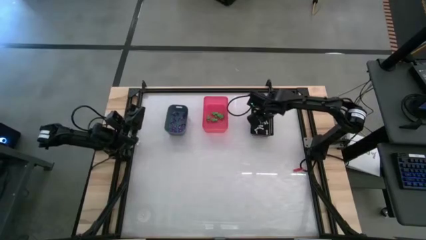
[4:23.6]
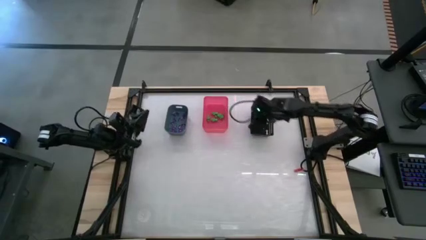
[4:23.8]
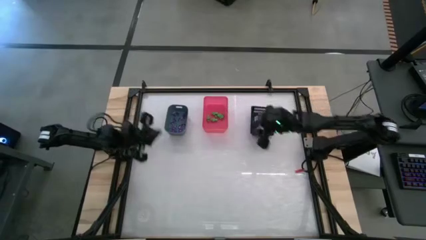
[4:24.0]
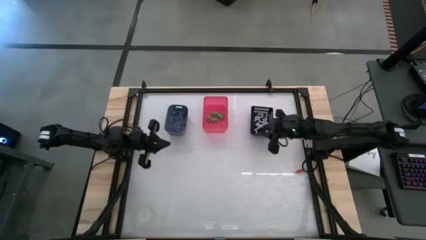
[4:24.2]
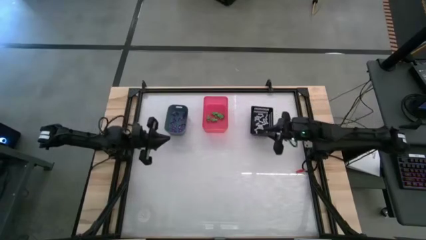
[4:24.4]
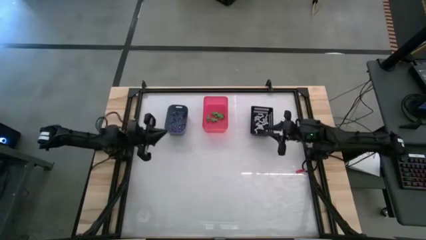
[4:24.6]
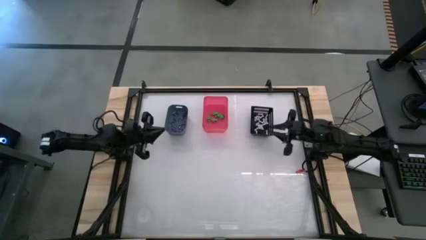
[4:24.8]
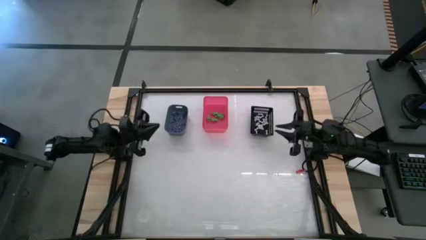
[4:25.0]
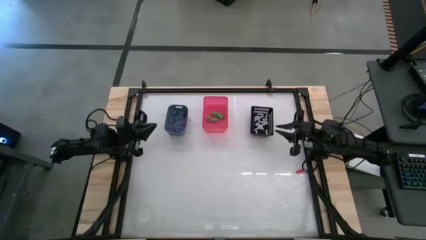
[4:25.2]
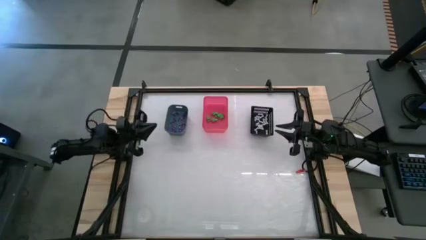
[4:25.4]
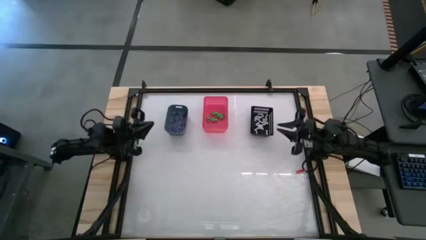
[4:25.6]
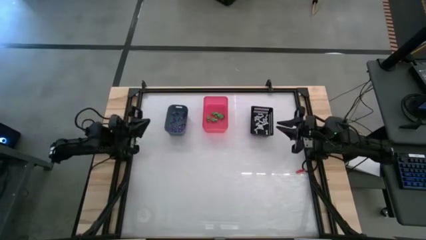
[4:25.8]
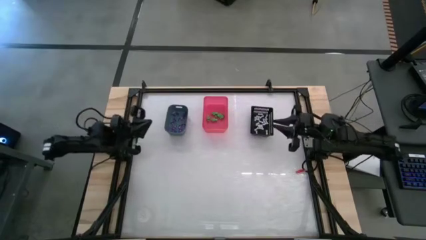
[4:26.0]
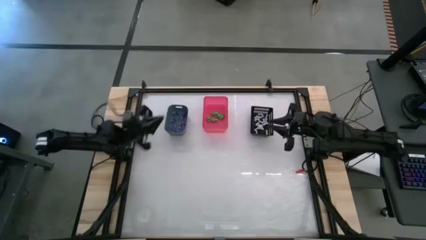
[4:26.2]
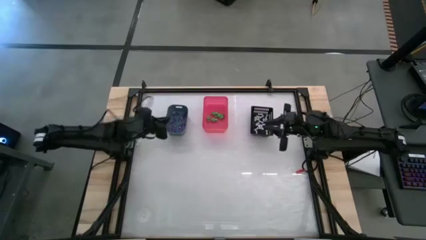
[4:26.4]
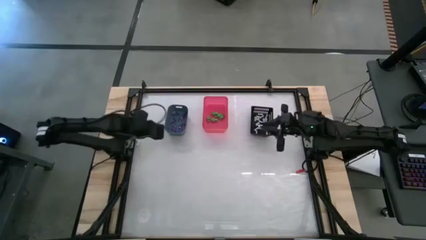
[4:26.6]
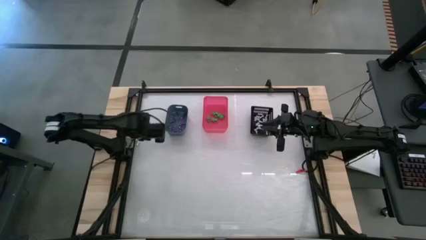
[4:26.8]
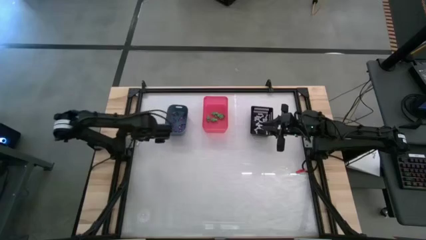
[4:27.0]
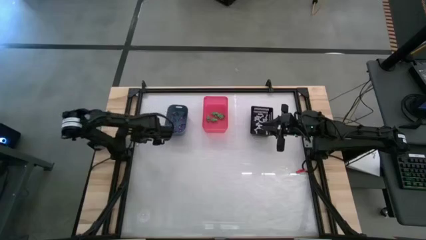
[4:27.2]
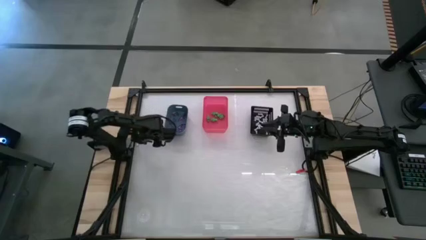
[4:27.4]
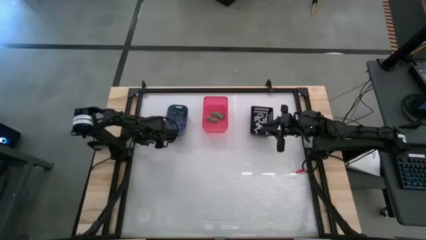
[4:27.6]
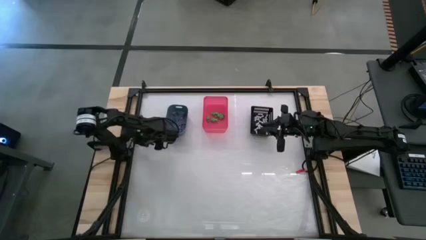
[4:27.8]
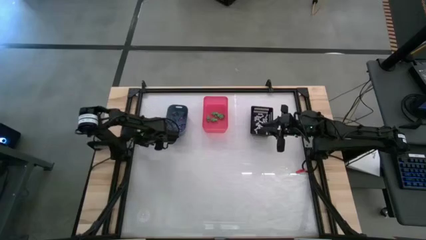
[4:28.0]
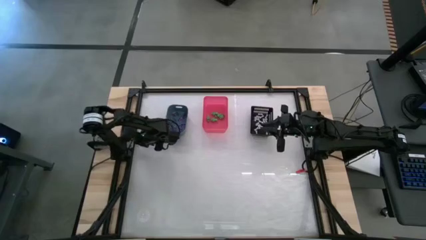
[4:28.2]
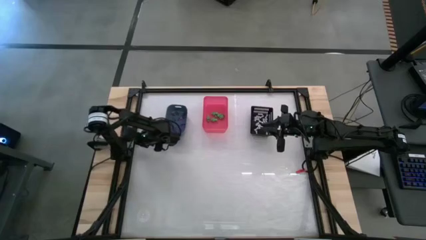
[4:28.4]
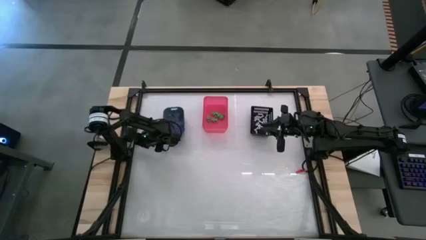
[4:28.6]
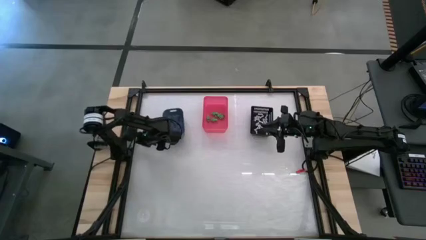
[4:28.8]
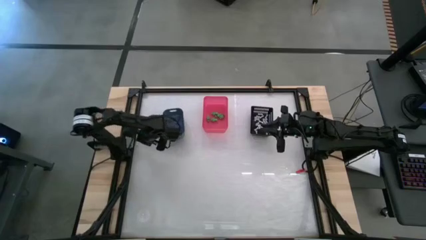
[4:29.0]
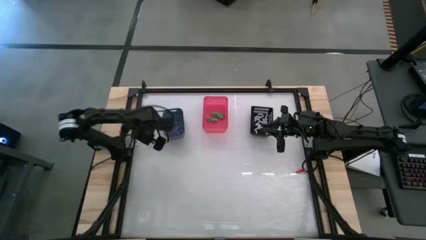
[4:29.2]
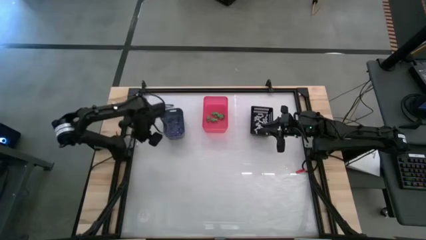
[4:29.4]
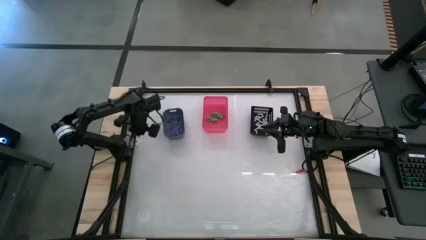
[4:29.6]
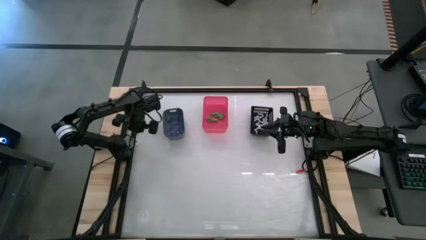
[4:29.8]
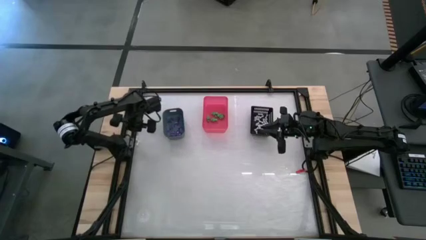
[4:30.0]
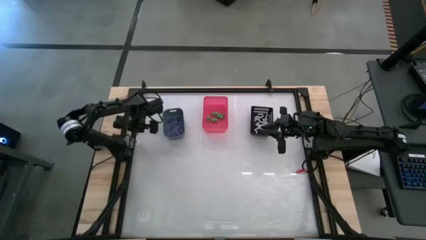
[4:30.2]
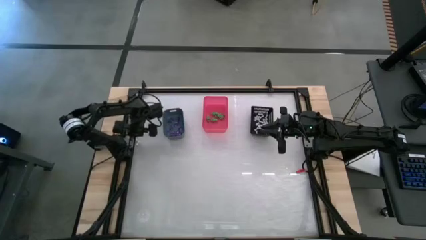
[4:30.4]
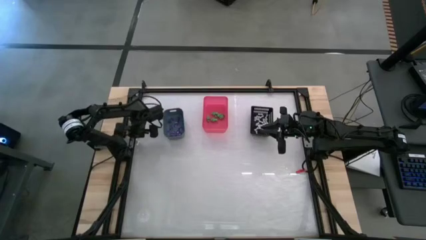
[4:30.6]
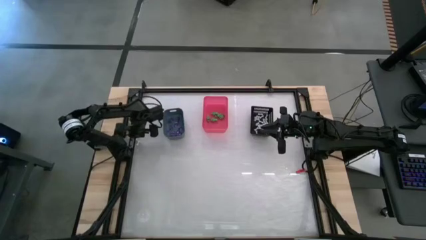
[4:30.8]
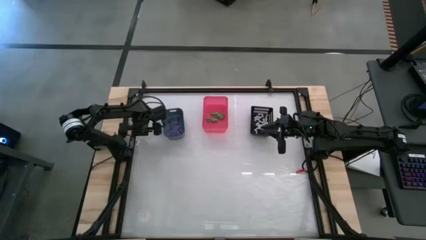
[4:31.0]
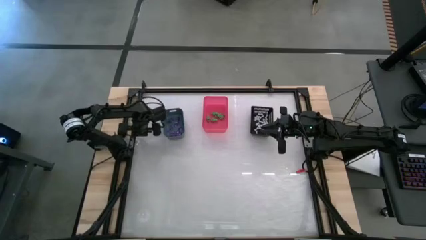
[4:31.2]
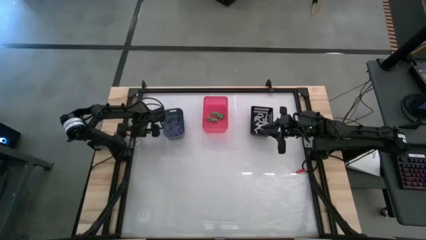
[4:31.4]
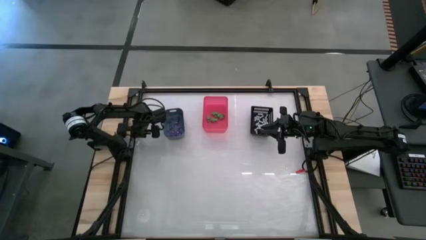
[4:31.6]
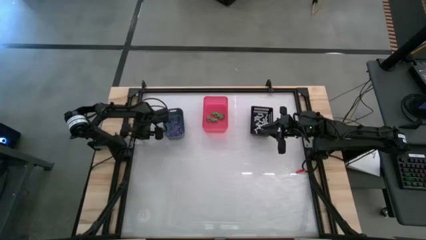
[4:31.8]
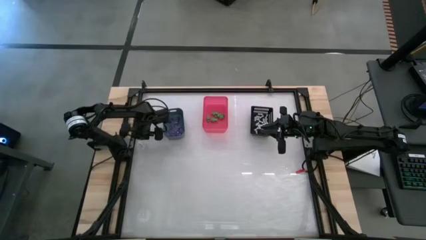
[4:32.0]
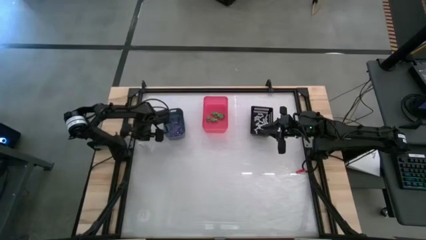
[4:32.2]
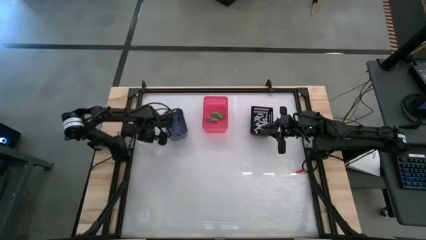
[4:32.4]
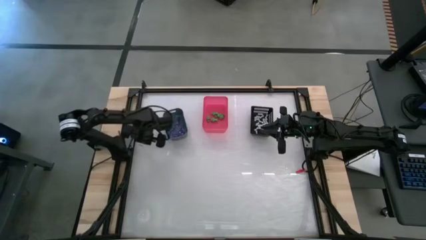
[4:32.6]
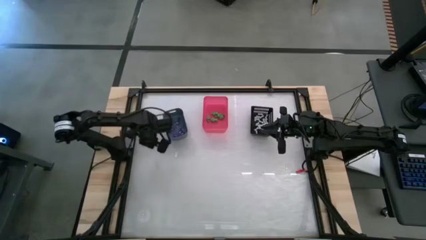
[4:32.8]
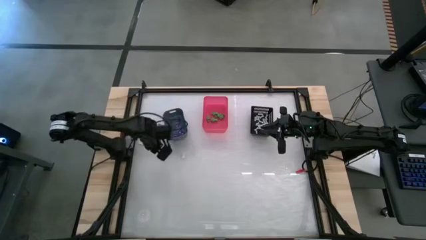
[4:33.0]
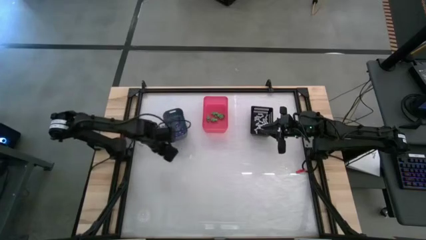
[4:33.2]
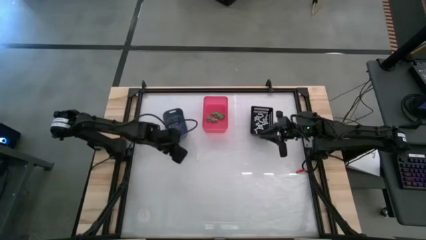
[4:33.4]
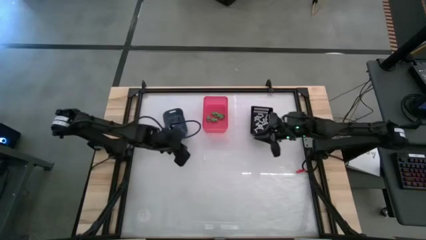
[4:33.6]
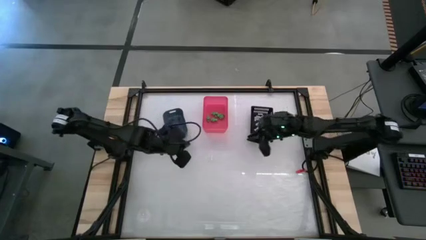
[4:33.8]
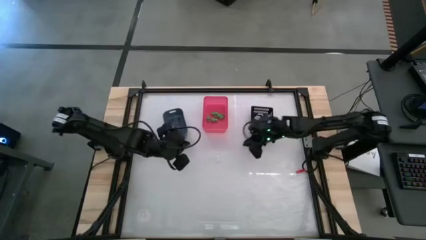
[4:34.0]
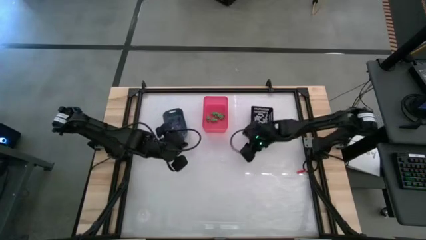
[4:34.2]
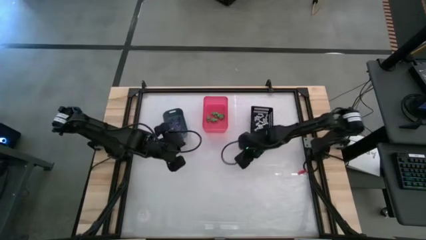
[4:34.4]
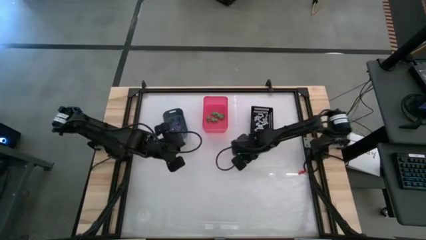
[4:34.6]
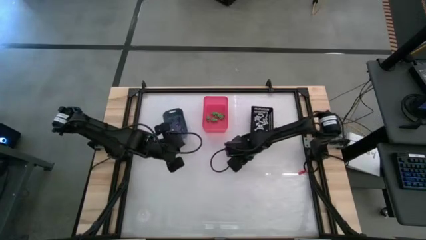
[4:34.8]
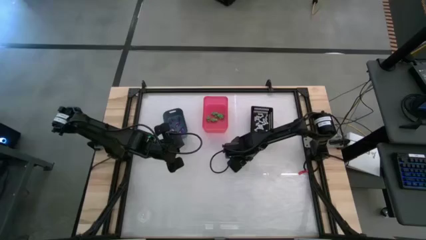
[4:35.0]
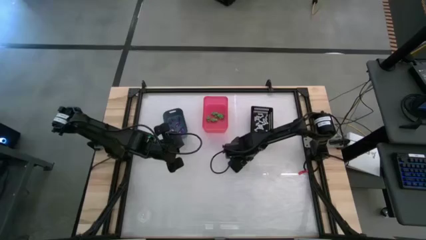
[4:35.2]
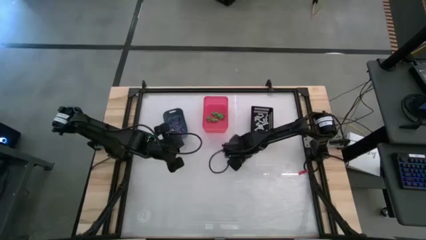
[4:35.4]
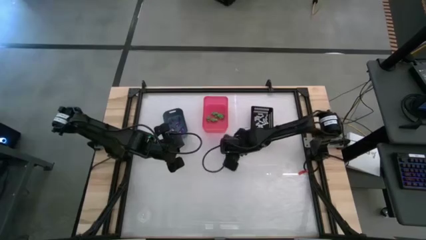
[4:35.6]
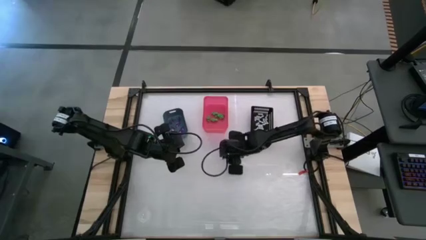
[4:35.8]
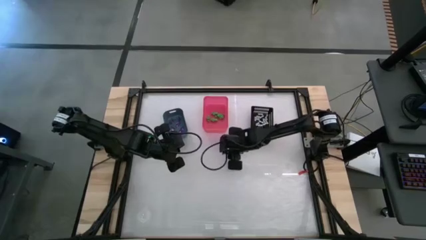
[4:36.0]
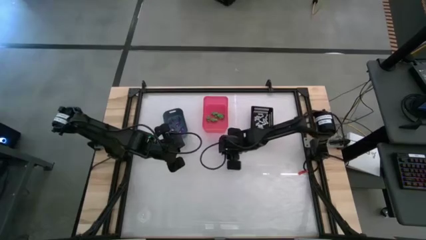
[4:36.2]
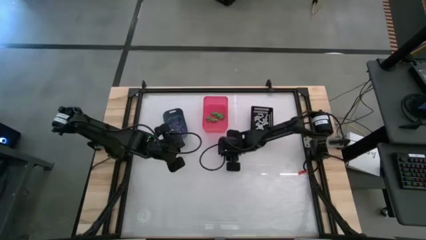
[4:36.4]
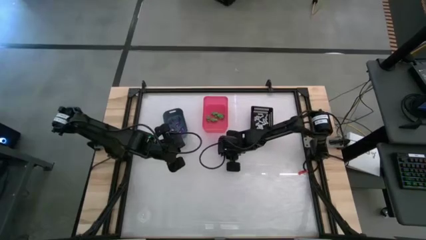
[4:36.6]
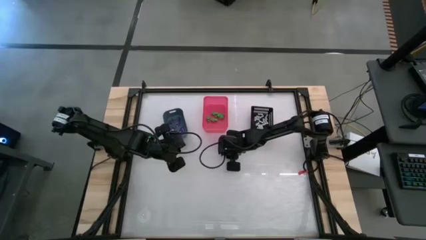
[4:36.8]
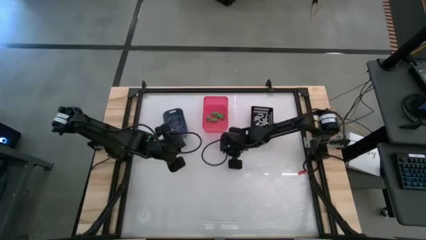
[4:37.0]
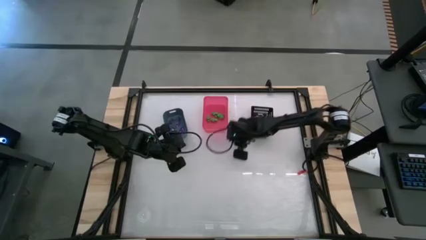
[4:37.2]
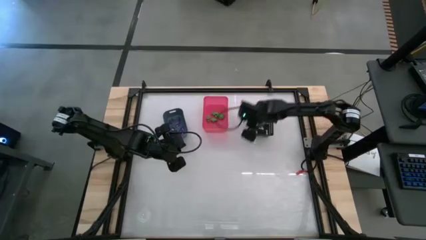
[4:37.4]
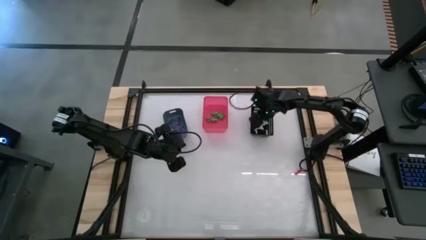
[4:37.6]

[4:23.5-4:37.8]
Task: Sort Halloween decoration
Put the white bone toy into the black bin

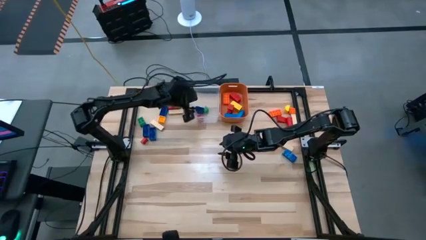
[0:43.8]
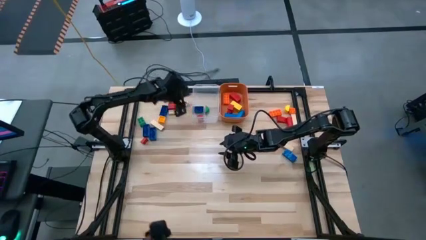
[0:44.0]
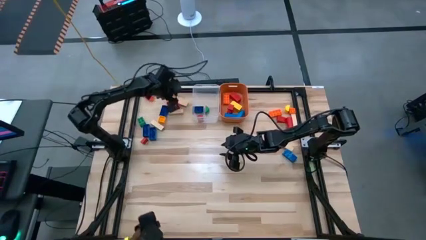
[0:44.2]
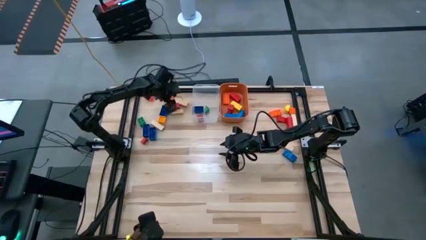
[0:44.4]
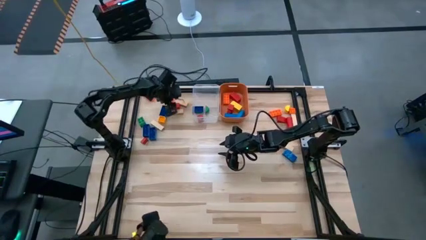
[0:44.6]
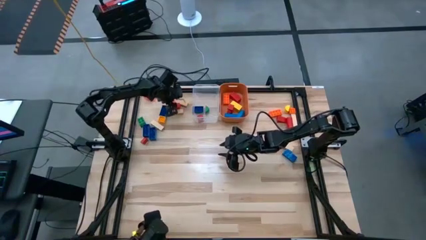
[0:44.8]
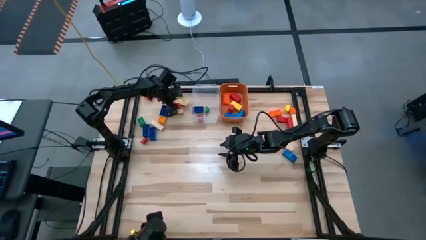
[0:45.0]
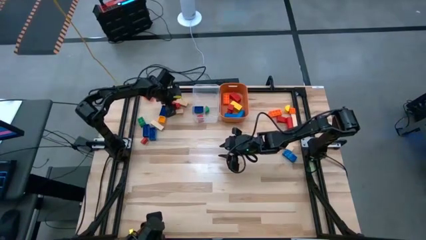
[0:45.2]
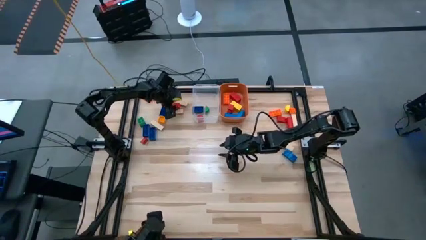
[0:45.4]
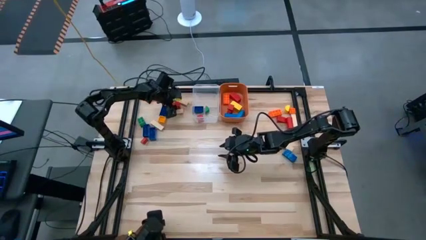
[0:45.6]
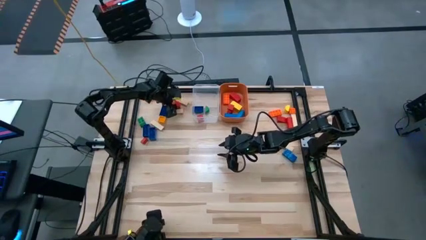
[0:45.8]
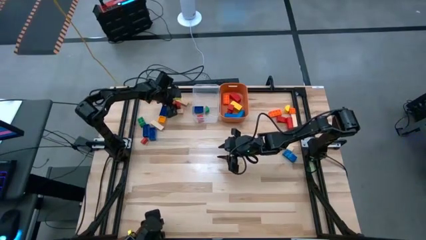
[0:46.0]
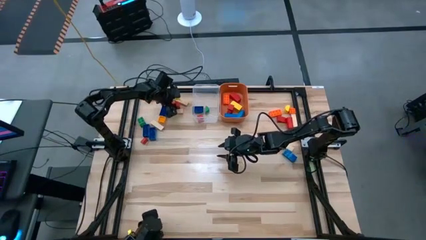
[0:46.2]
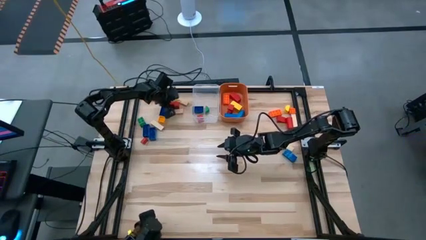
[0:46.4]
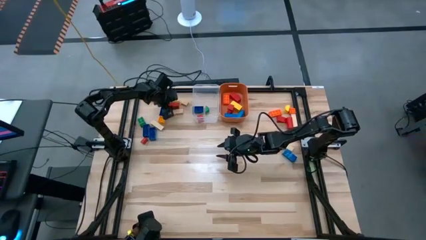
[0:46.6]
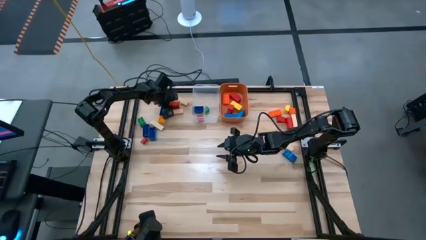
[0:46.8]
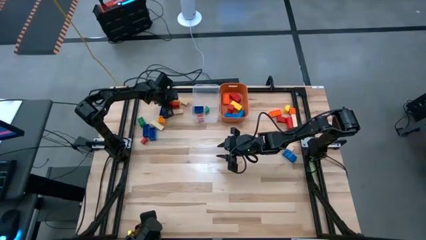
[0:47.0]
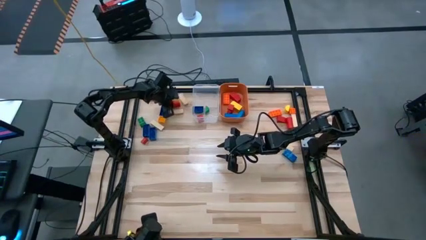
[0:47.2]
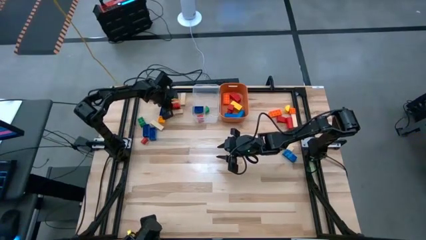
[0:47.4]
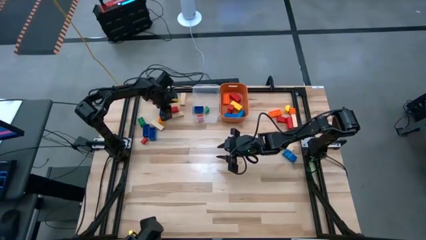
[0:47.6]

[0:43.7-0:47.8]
Task: Sort blocks by size
Put the red rectangle block into the orange bin
